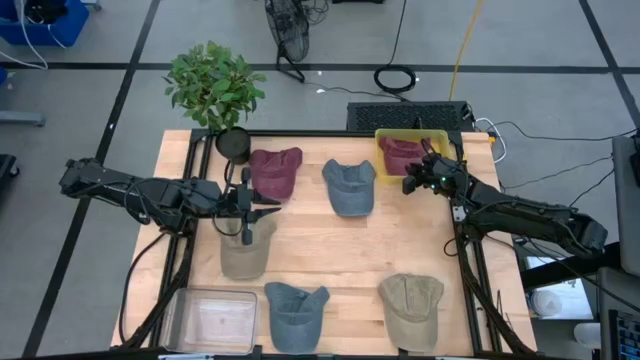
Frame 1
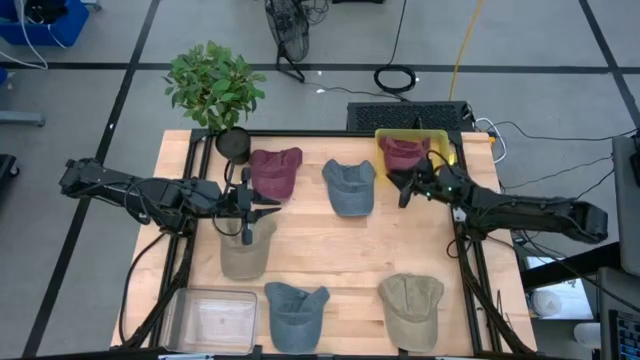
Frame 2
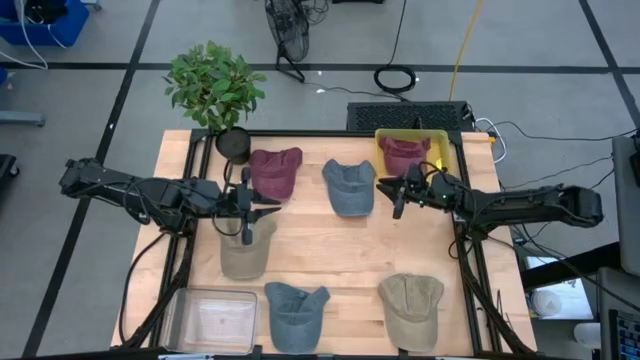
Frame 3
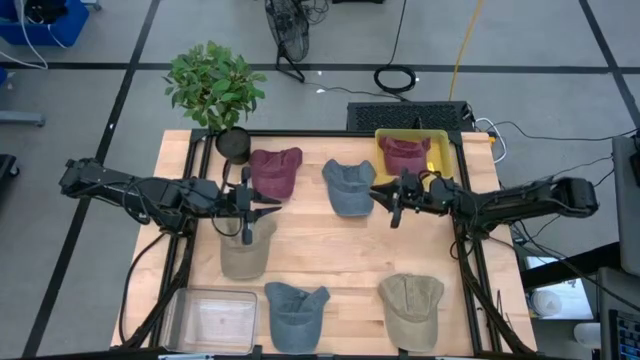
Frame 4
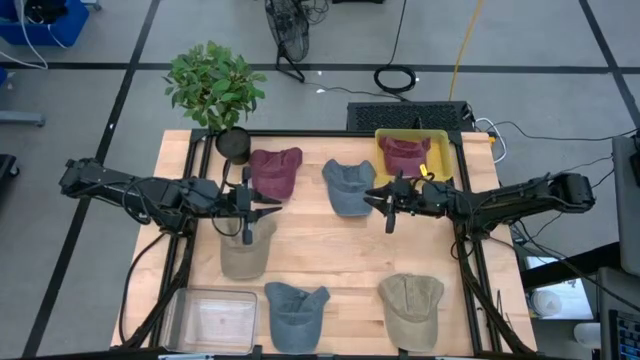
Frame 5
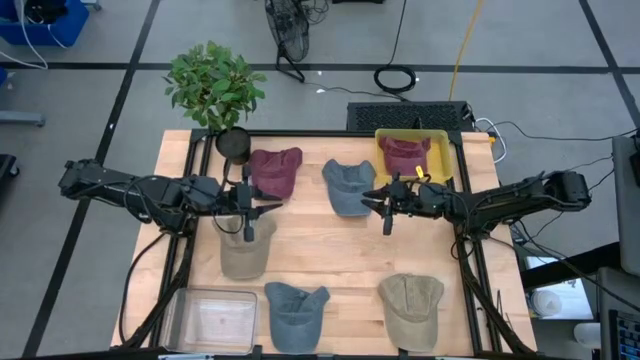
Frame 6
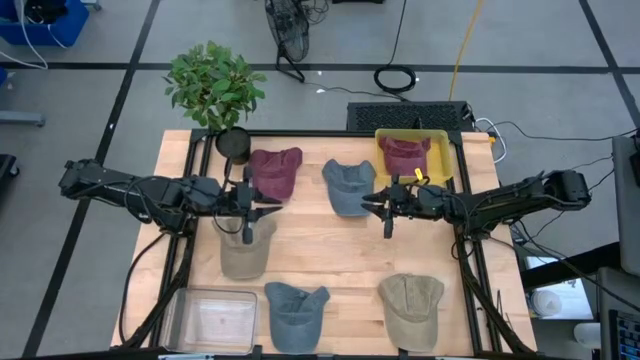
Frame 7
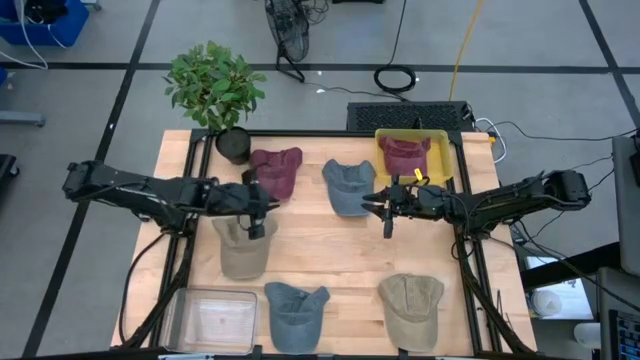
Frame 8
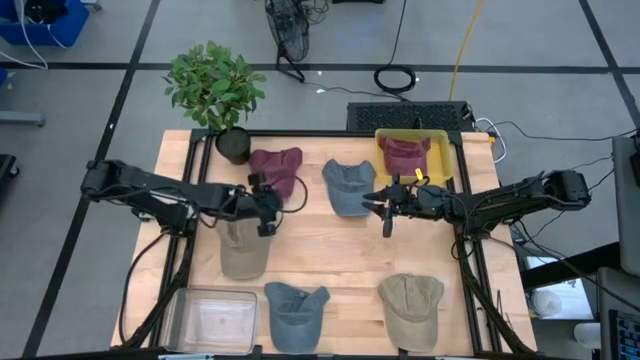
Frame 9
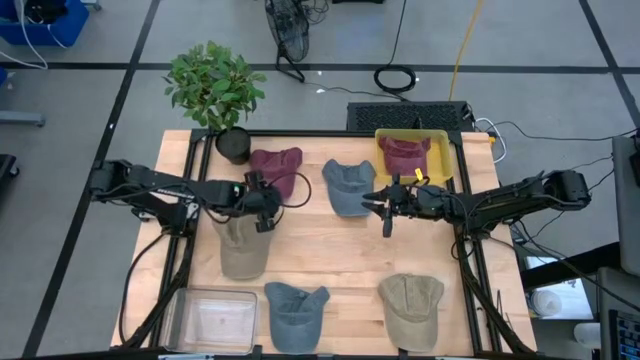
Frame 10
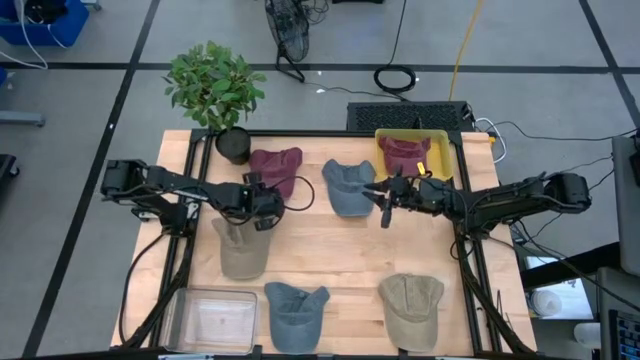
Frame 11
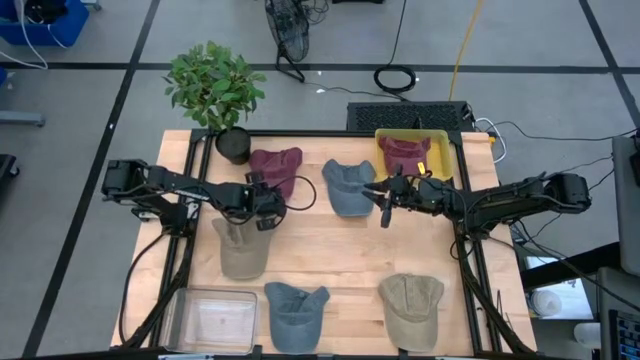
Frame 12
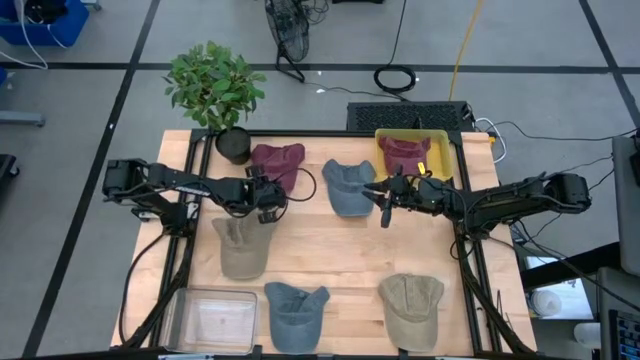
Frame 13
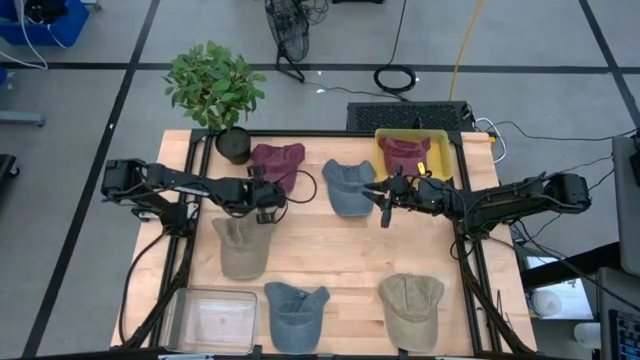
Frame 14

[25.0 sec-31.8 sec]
Task: Pick & Place hat
Put the pale red cap into the yellow bin

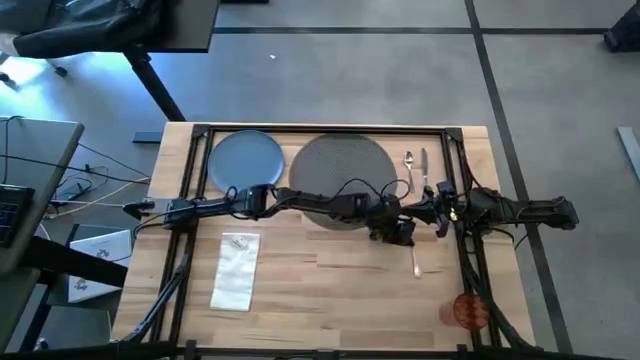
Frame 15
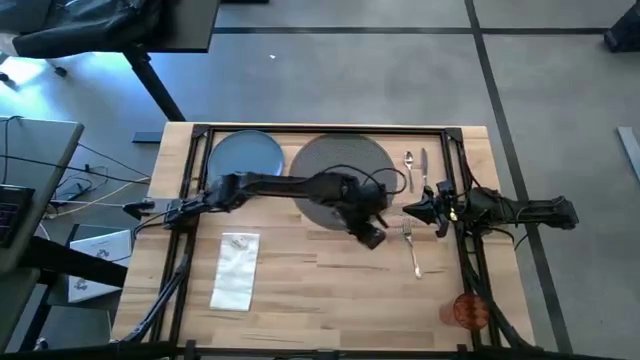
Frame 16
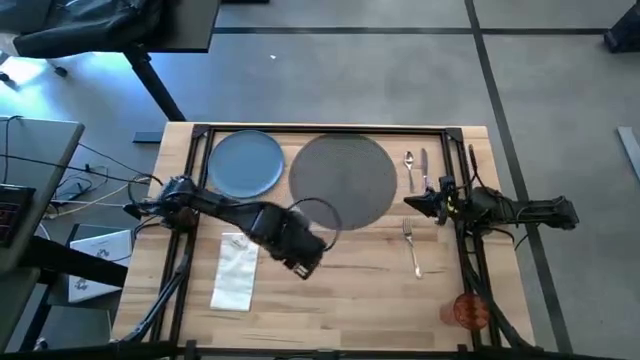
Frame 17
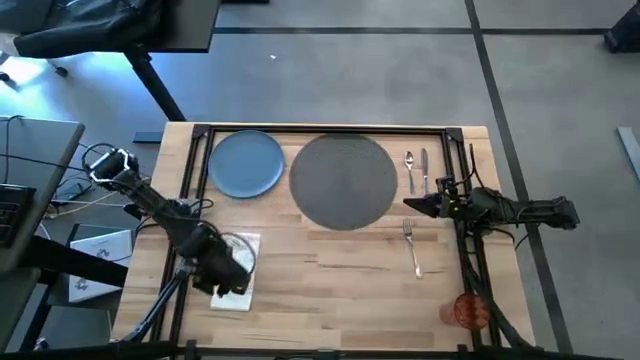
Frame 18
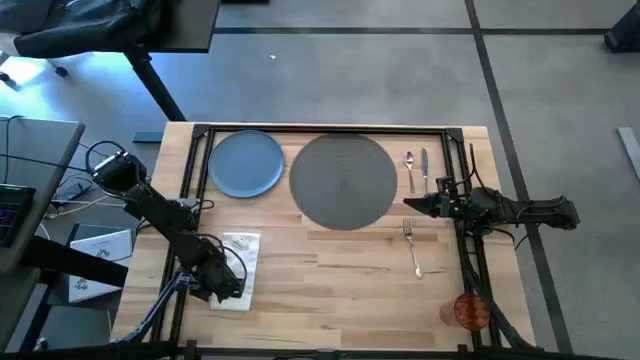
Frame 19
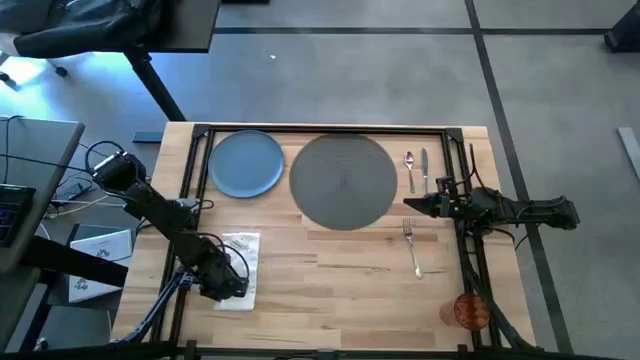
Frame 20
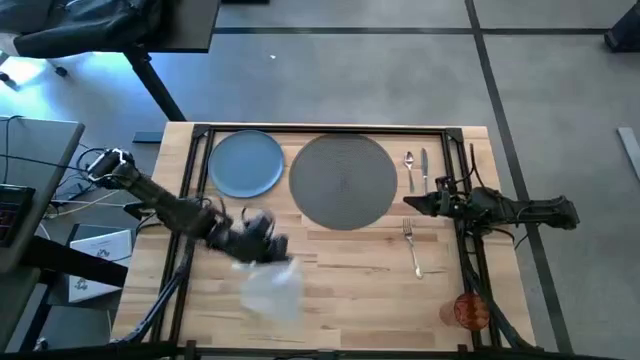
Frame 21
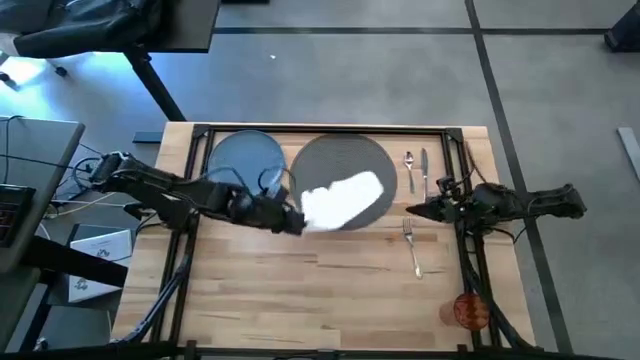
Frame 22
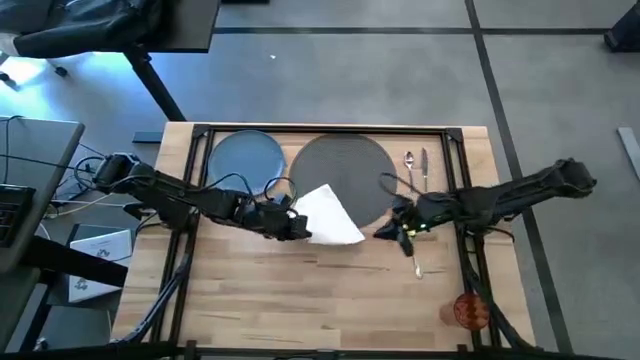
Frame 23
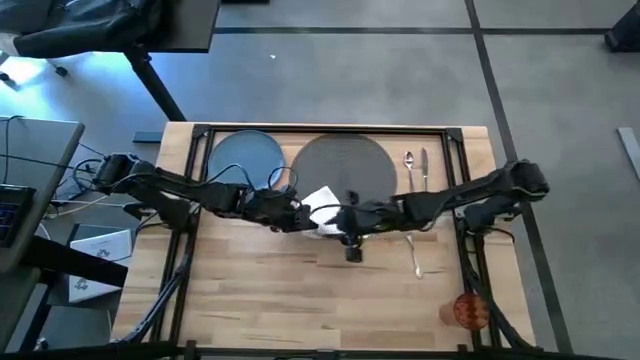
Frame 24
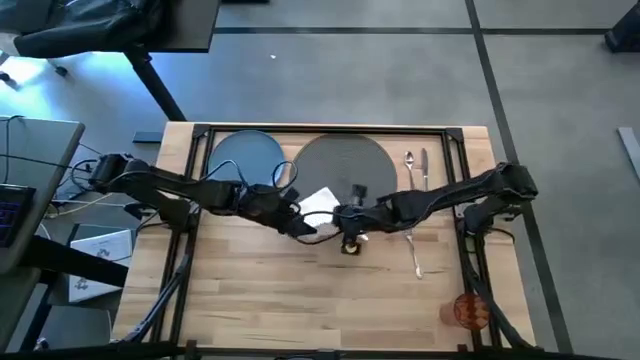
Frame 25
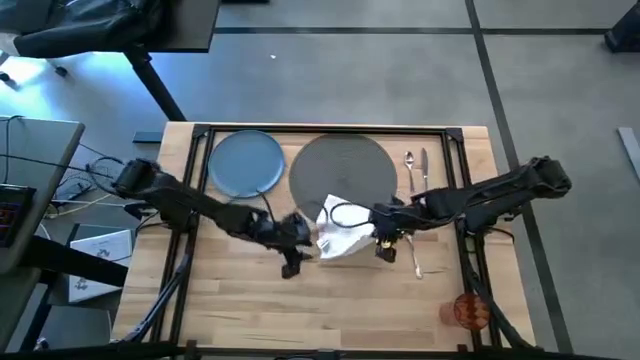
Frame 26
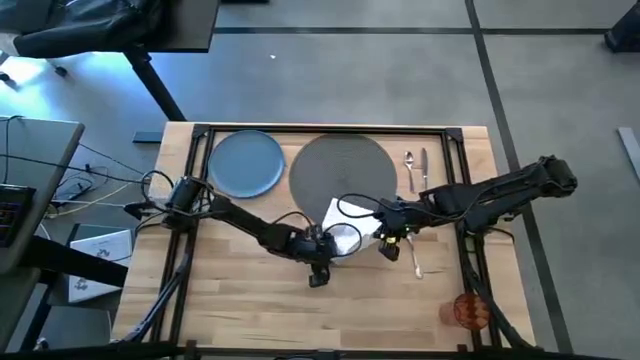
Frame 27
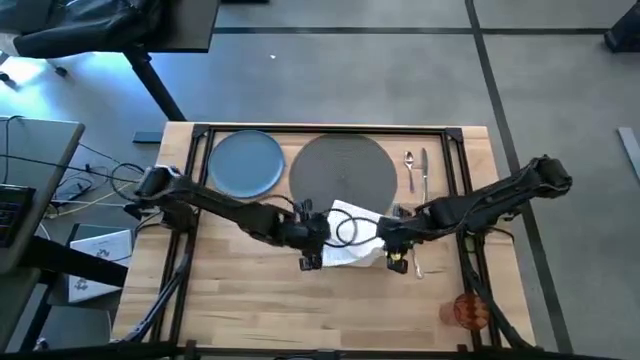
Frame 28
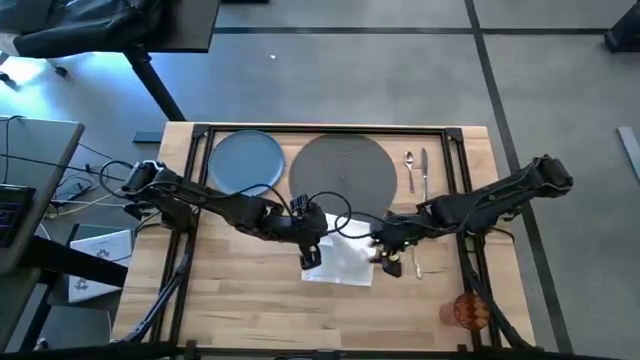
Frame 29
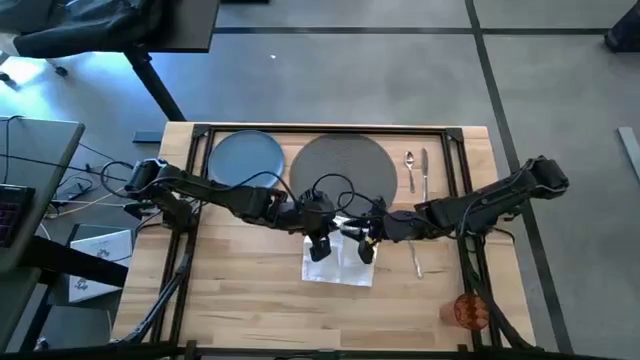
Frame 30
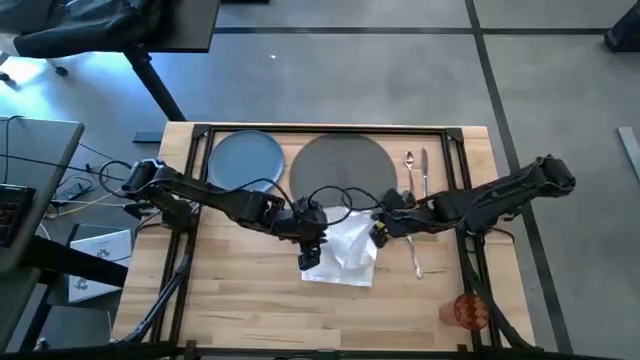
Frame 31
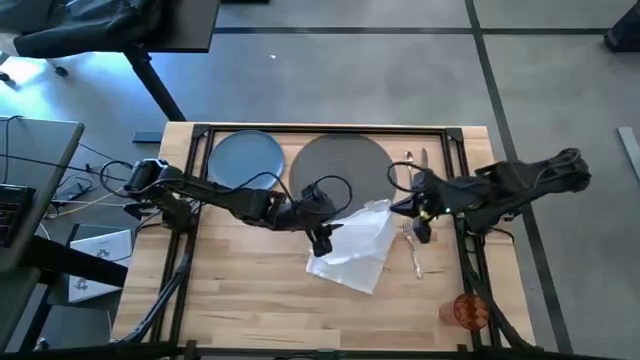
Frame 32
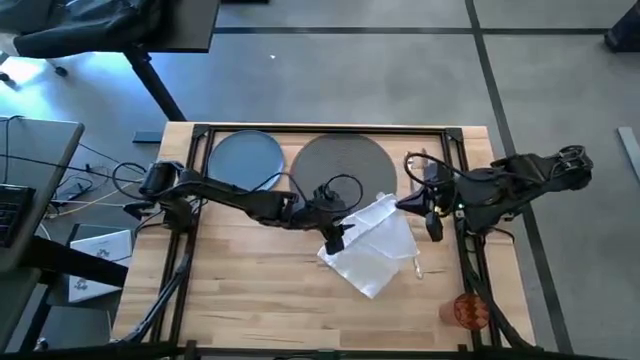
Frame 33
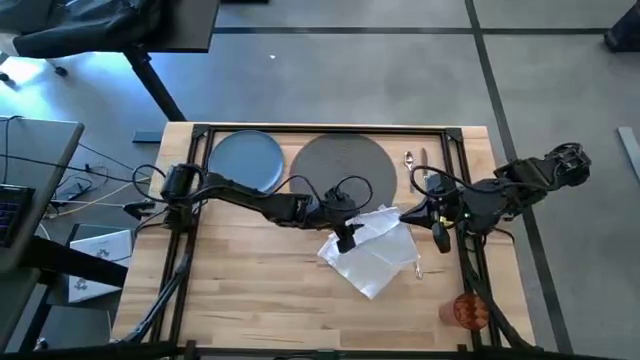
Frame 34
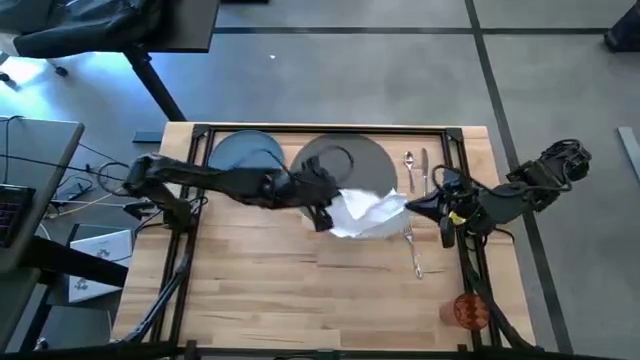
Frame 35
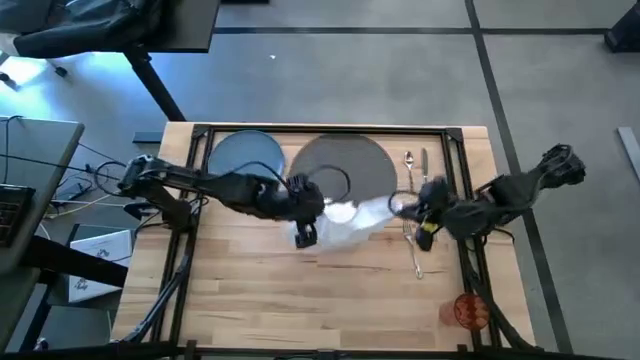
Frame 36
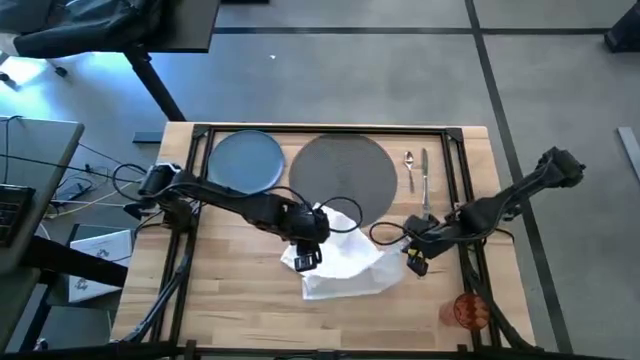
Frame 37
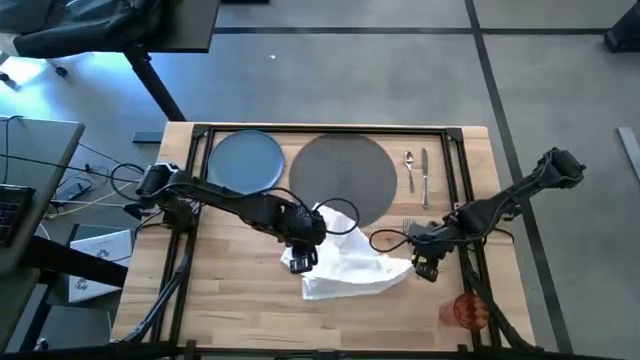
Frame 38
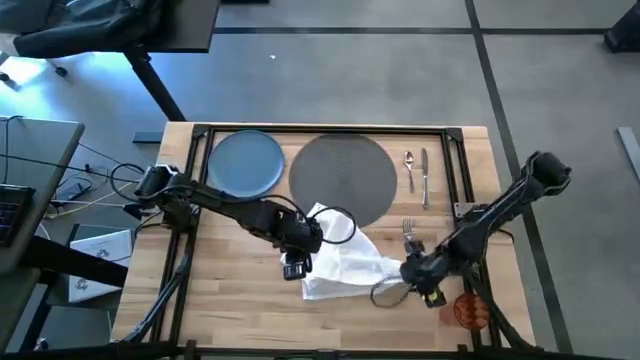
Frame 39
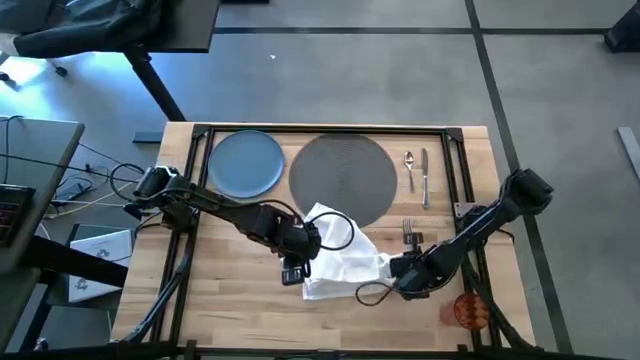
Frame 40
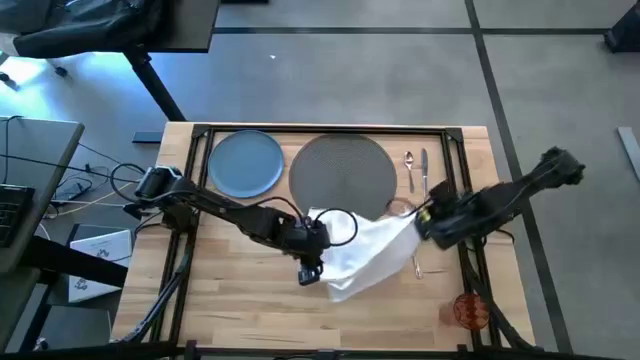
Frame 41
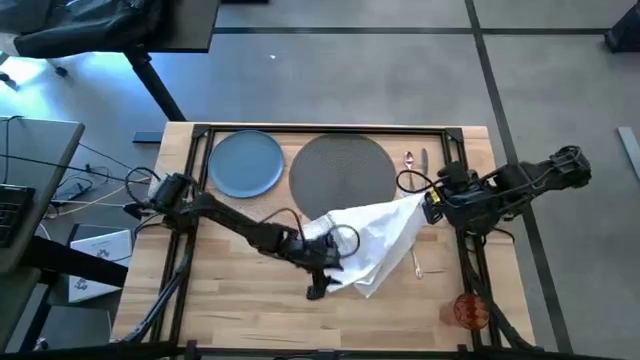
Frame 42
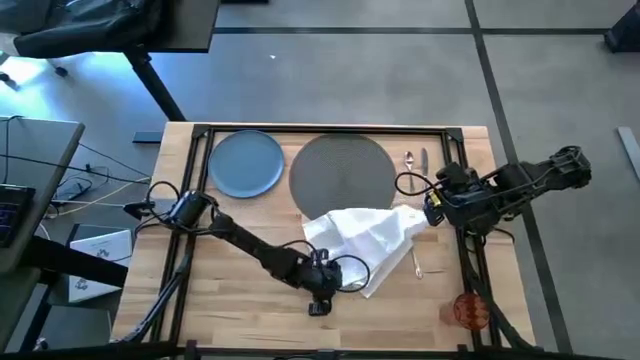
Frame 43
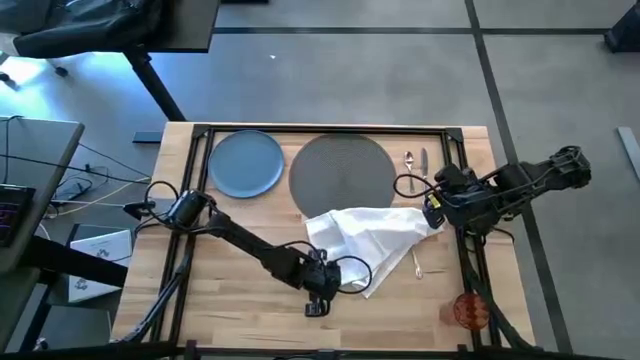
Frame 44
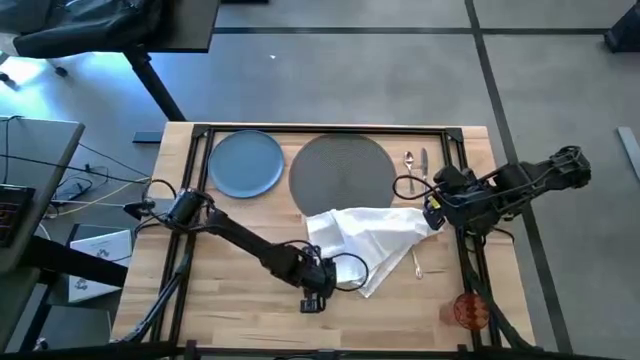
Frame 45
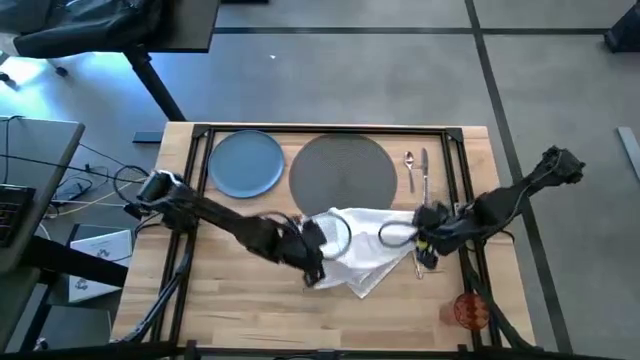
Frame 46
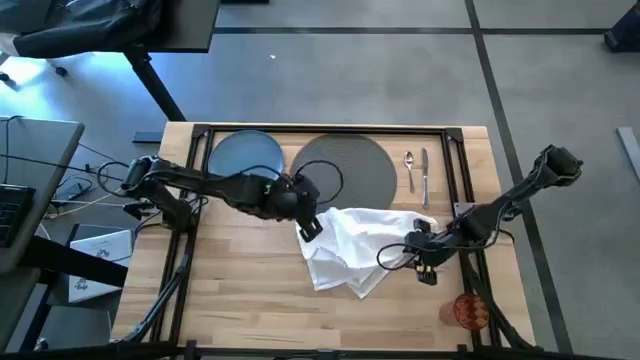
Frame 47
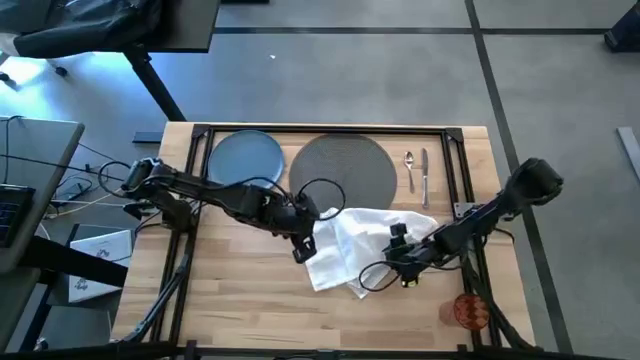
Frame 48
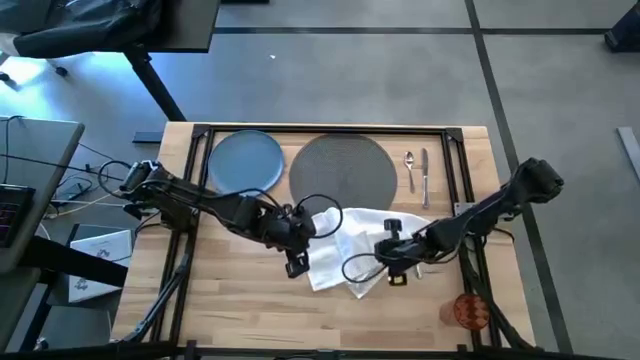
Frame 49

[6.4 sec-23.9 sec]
Task: Set table place
Fold the white table napkin
